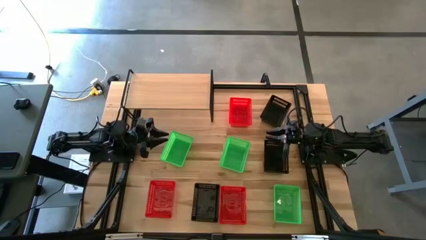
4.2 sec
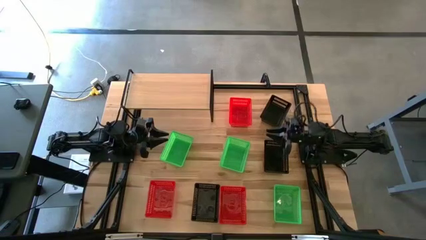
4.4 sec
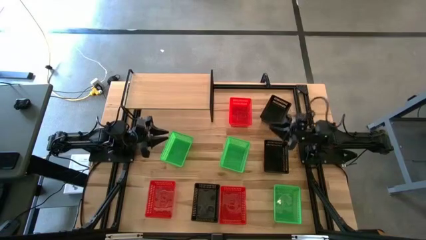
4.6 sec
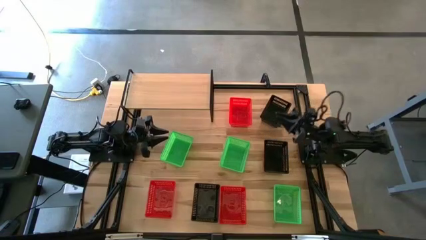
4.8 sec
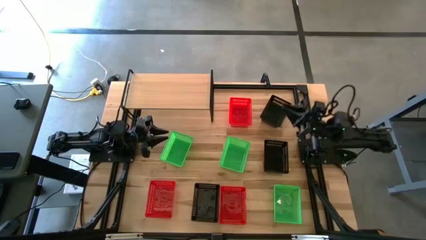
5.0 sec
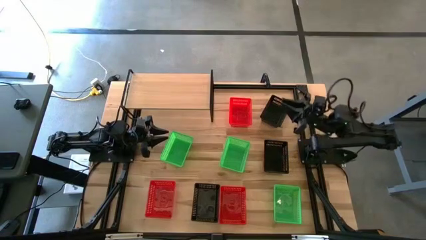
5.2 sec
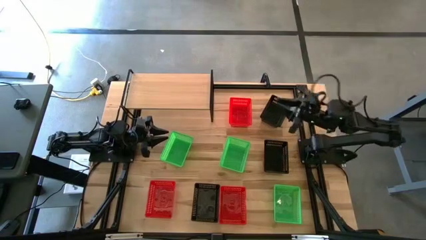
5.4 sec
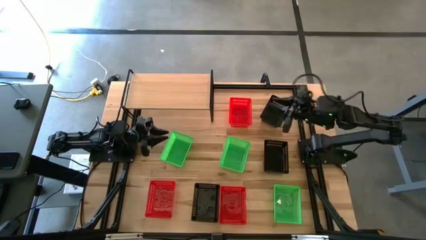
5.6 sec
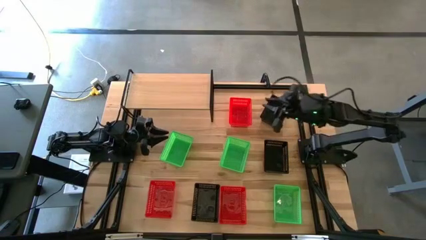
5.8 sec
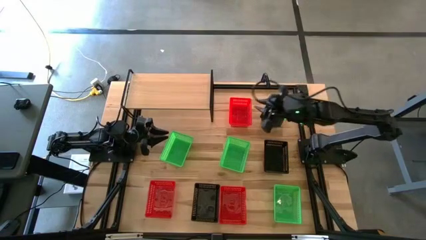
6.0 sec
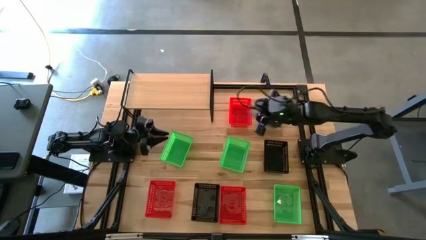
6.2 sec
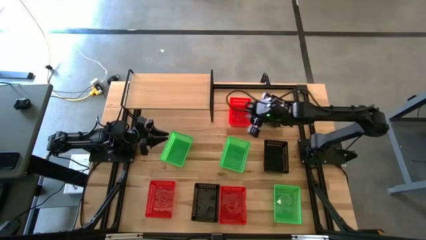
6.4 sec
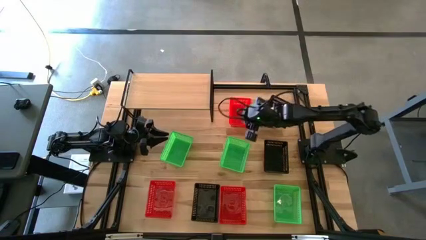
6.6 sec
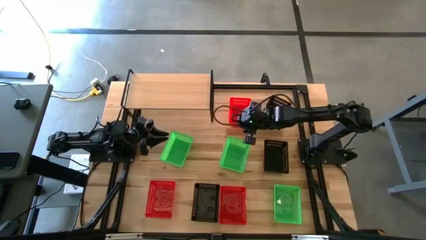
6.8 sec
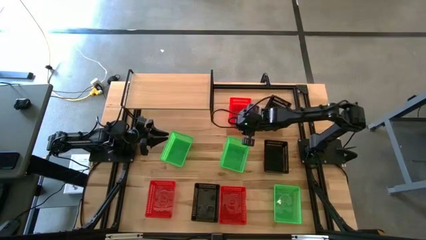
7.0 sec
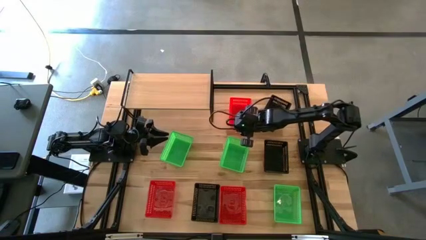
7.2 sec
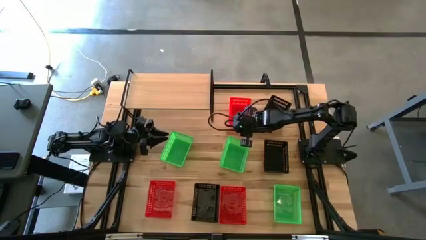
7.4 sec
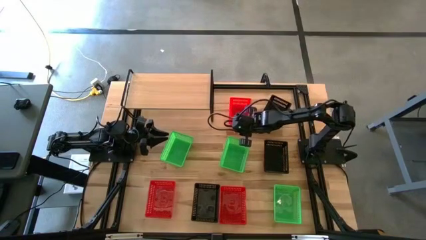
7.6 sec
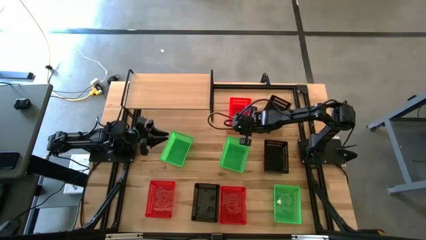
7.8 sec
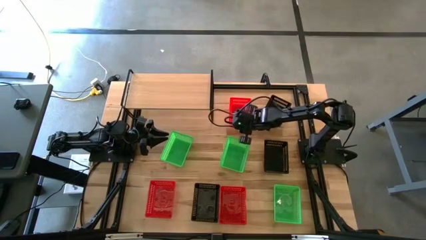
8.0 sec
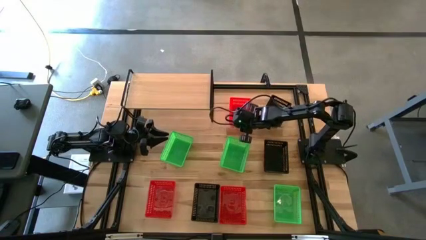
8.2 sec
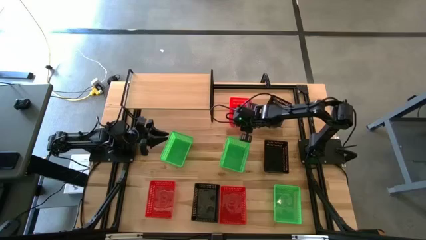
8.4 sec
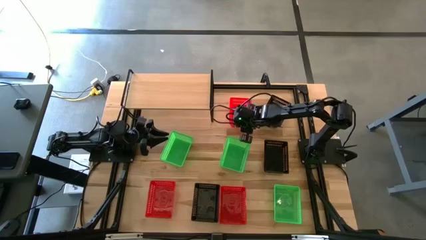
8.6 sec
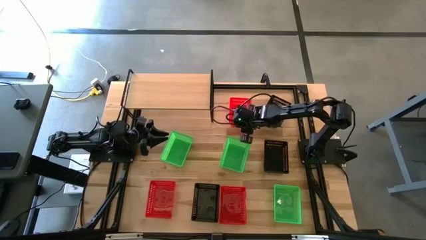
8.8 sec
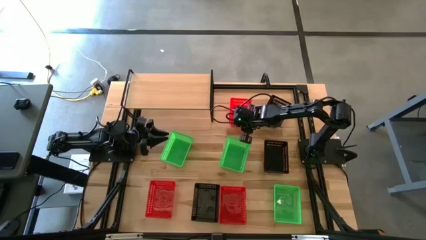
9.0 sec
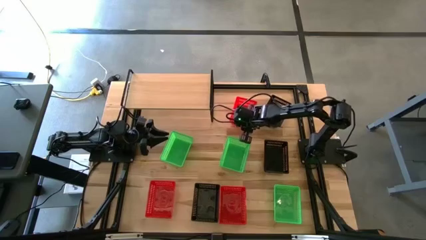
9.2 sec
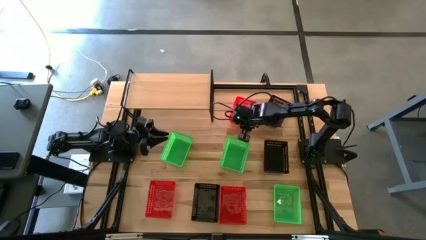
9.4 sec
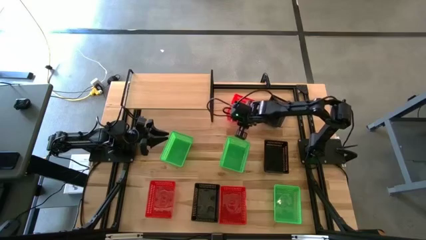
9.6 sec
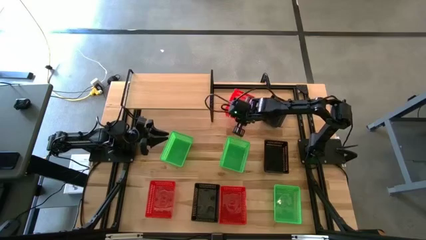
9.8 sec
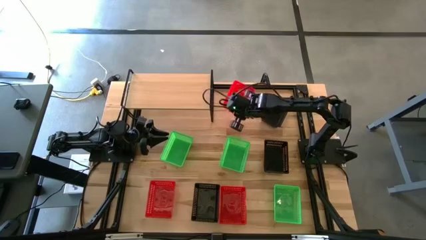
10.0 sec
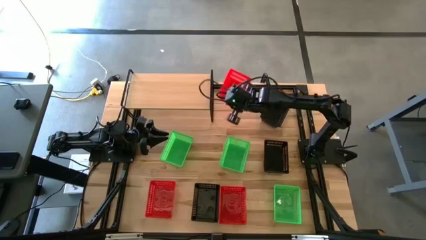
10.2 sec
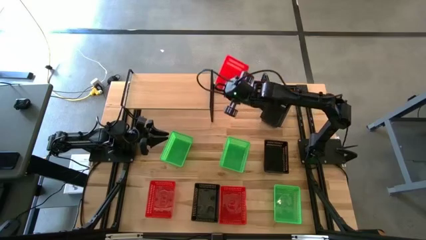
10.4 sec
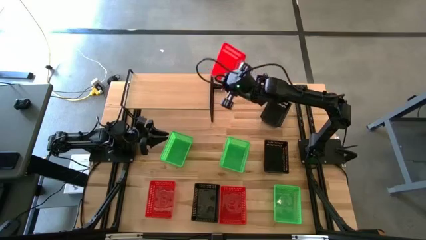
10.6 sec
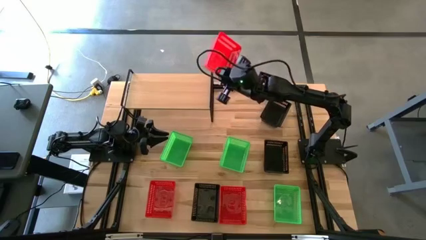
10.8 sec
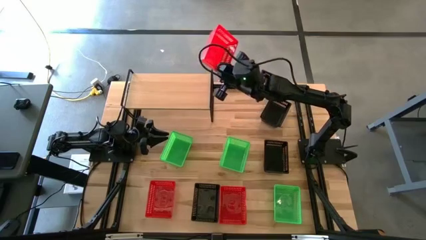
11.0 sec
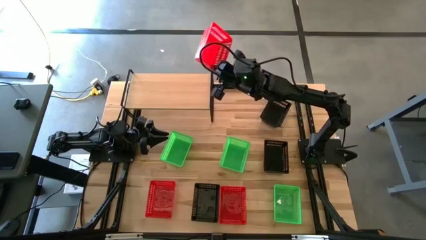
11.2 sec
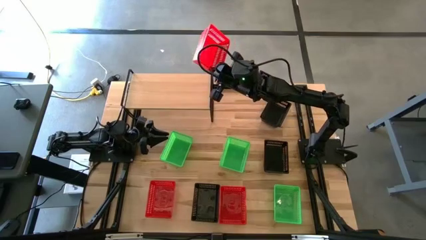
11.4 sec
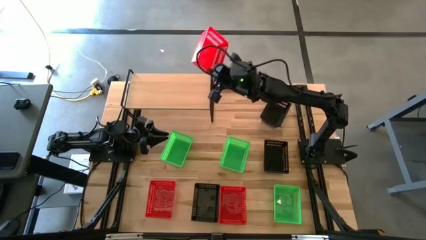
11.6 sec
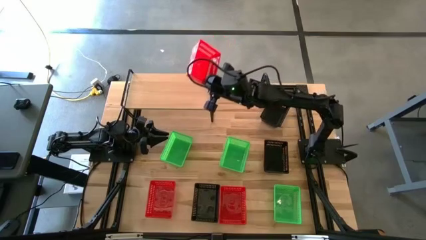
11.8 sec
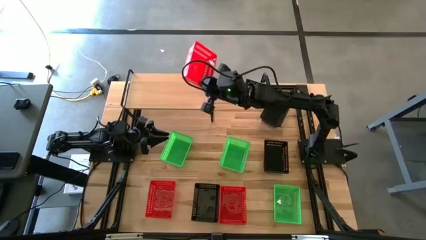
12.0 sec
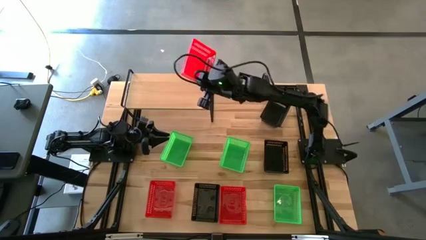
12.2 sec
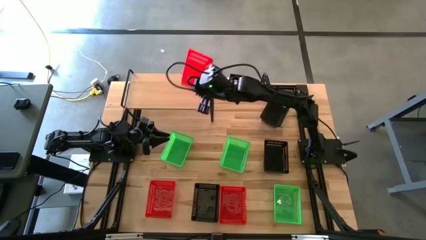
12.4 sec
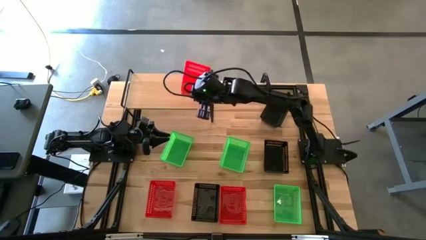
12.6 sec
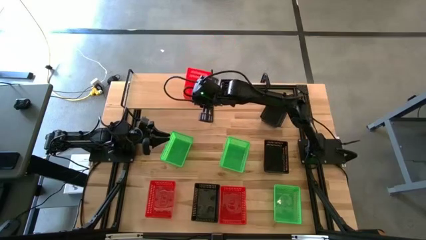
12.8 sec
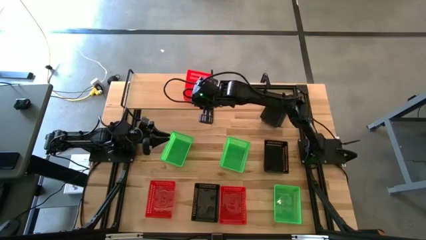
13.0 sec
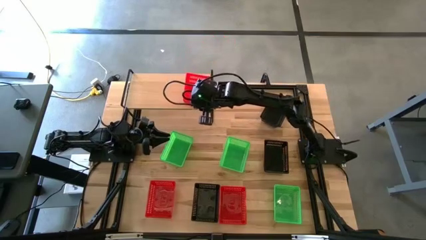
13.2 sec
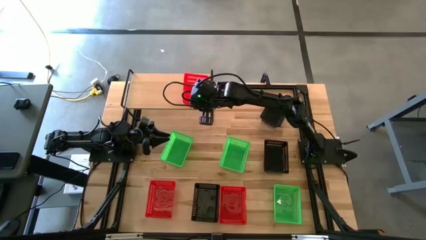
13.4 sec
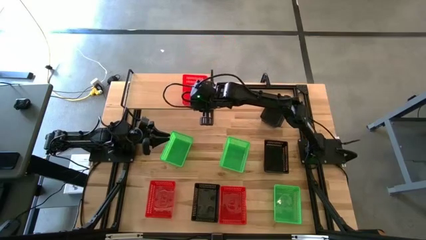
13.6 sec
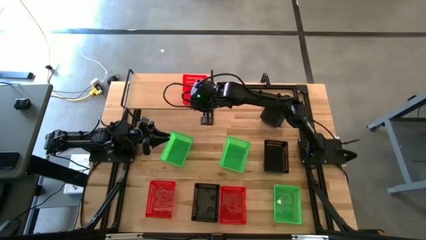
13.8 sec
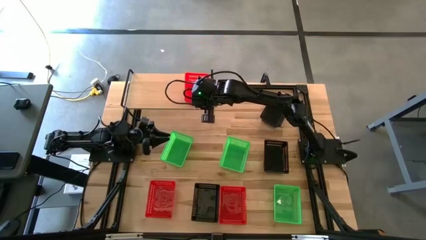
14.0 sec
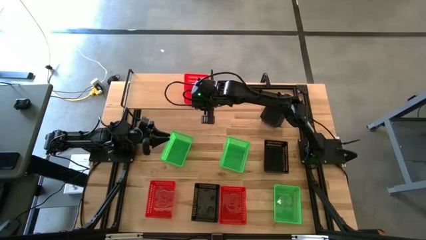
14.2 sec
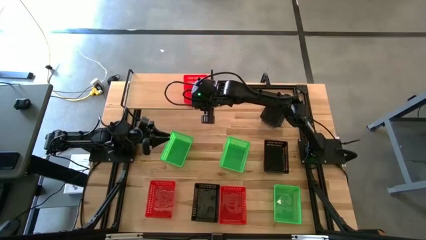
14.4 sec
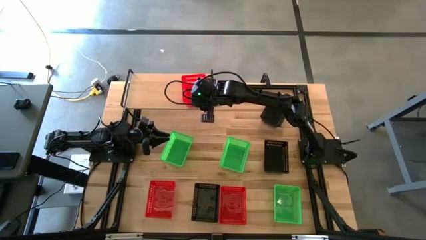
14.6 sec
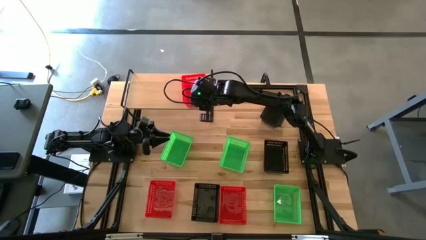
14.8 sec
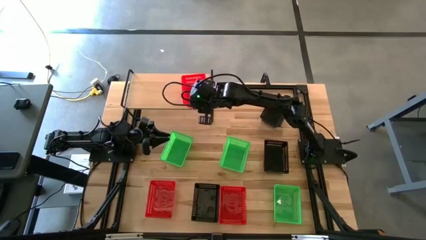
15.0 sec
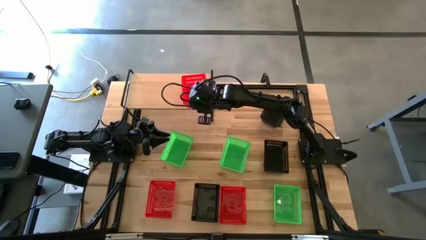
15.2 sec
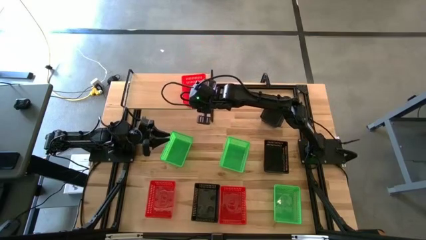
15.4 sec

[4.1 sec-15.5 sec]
Task: Stack baskets on shelf by color
Put the top right red bin on the shelf

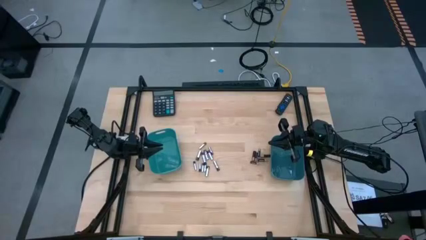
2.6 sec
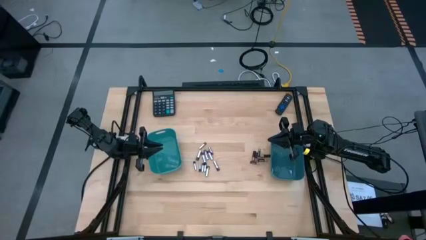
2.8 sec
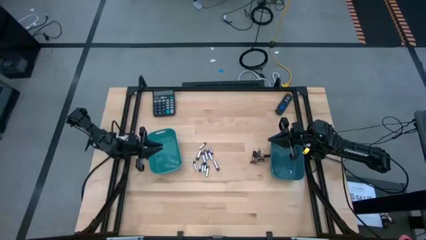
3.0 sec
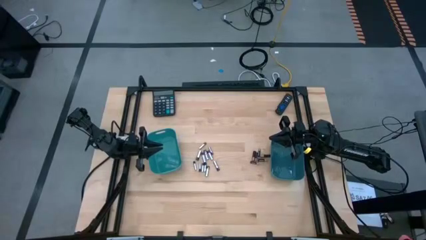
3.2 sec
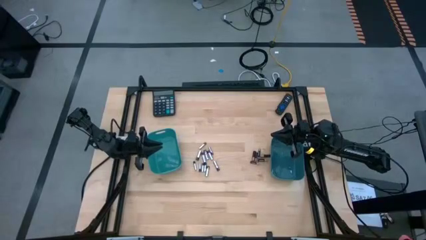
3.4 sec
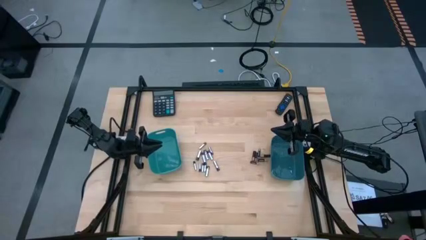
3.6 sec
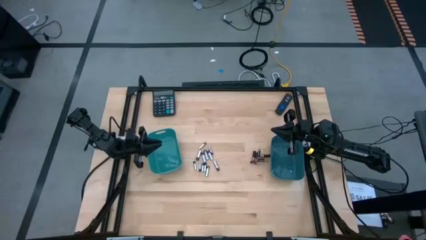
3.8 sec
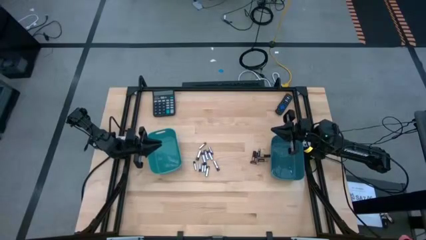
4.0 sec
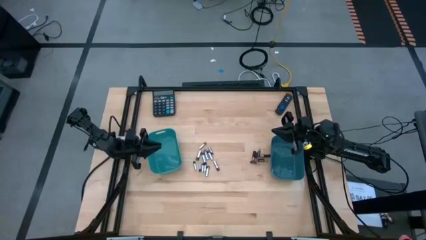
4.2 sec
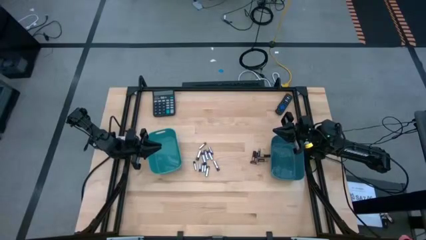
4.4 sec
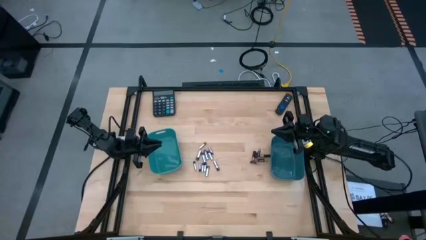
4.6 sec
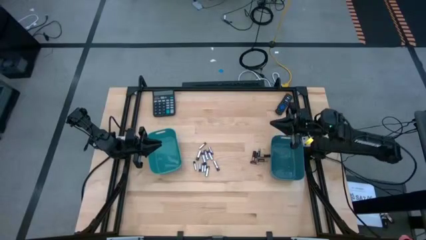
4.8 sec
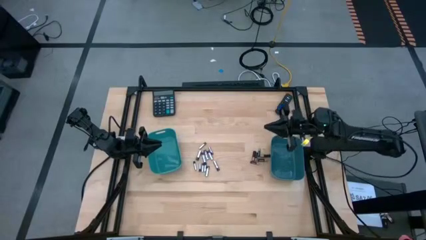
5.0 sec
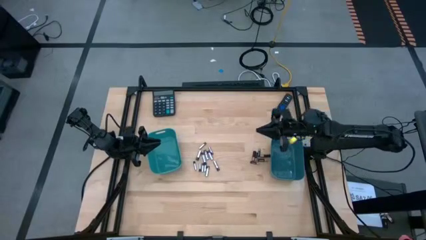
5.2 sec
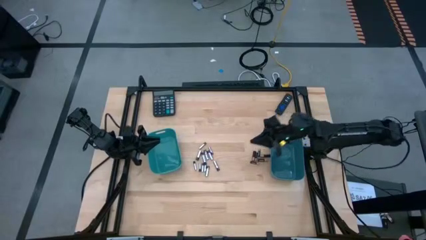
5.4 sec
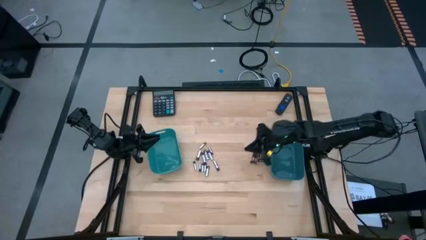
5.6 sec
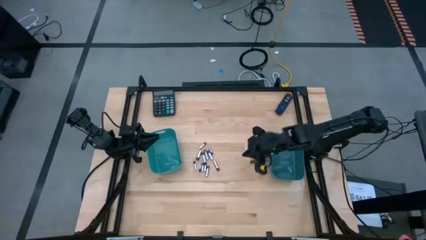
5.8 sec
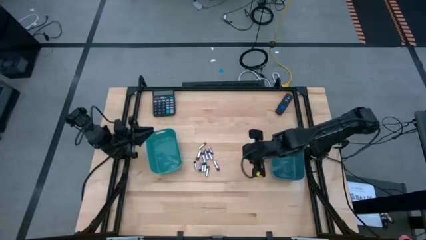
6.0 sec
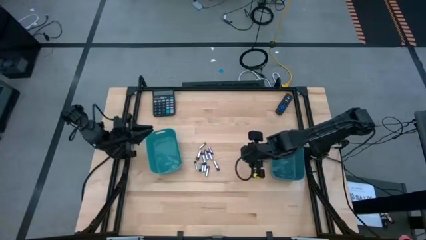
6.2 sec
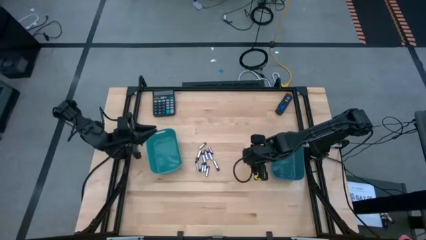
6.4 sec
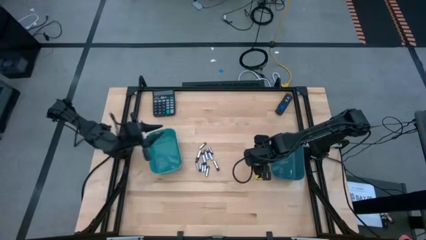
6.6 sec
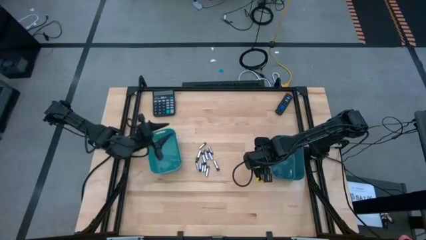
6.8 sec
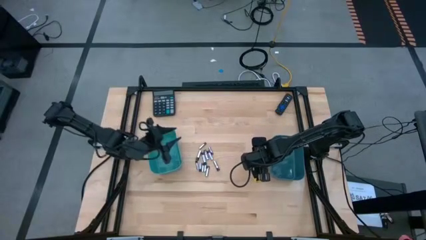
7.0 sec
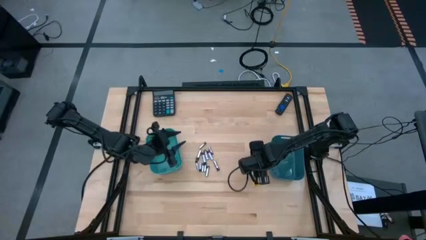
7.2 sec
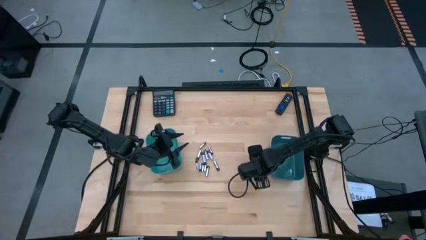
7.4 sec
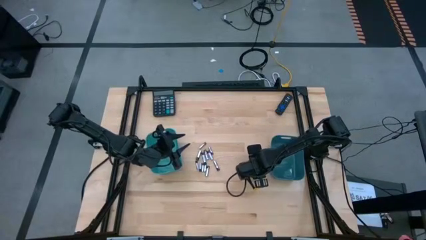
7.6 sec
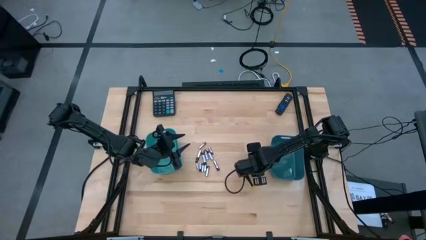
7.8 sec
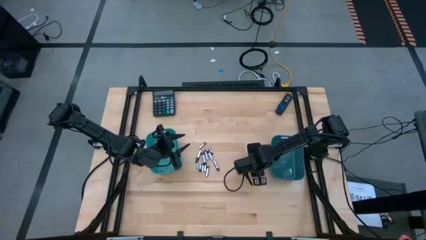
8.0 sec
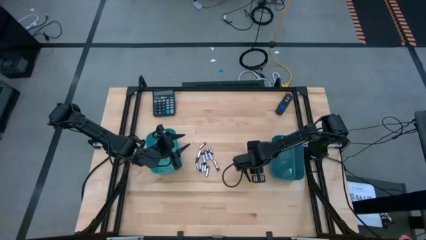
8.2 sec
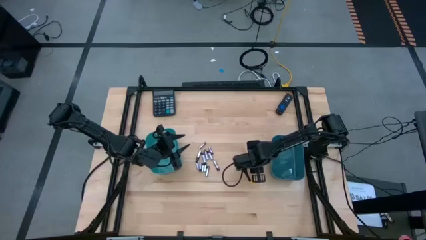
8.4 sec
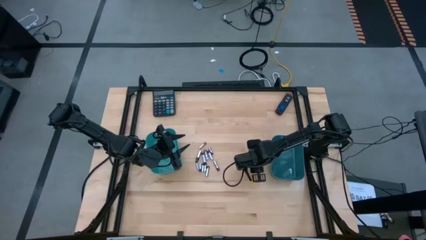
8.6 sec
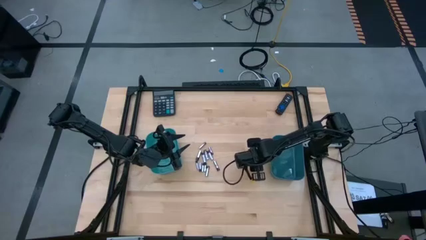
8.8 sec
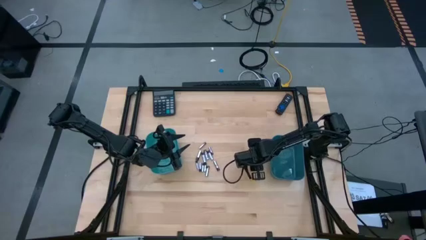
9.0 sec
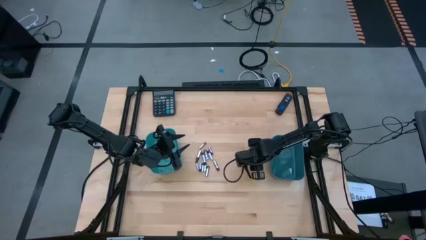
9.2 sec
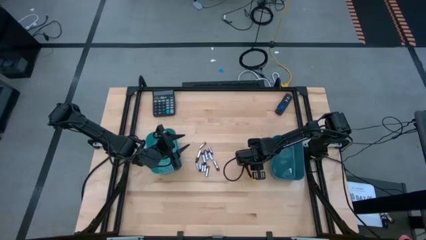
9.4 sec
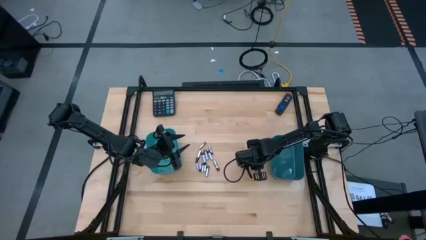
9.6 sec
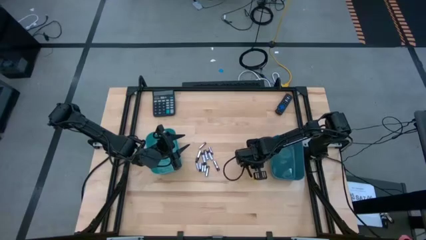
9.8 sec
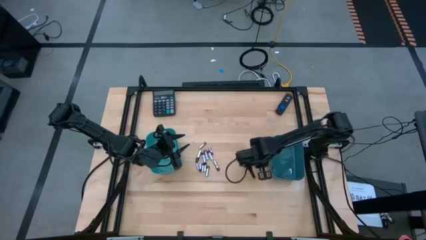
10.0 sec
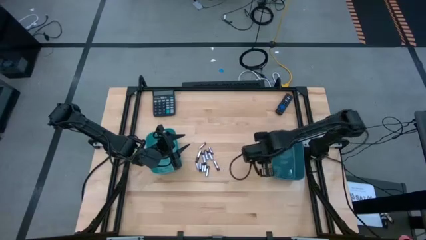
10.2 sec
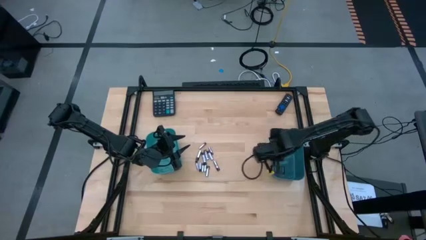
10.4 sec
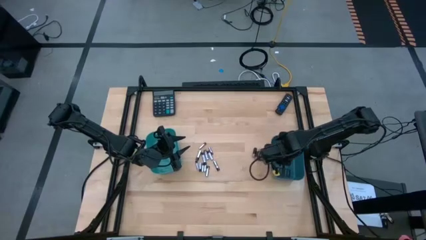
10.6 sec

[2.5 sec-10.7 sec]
Task: Sort batteries
Put the black battery into the right blue bin
